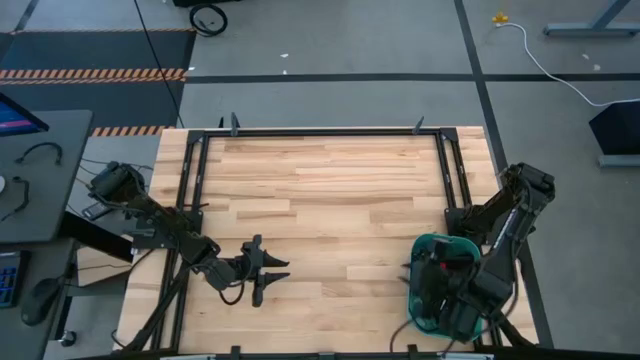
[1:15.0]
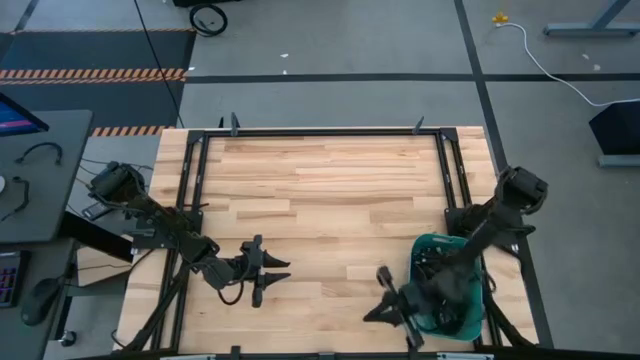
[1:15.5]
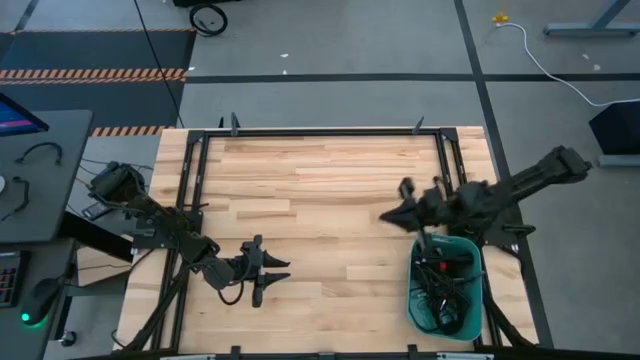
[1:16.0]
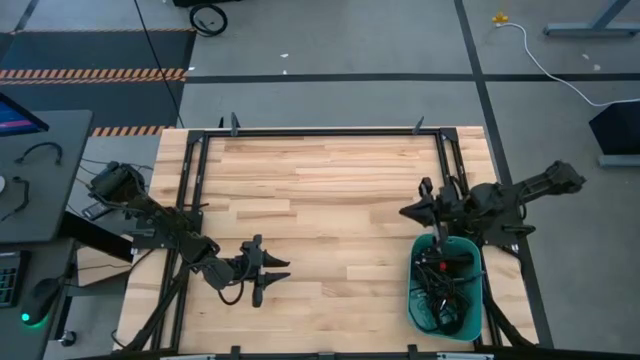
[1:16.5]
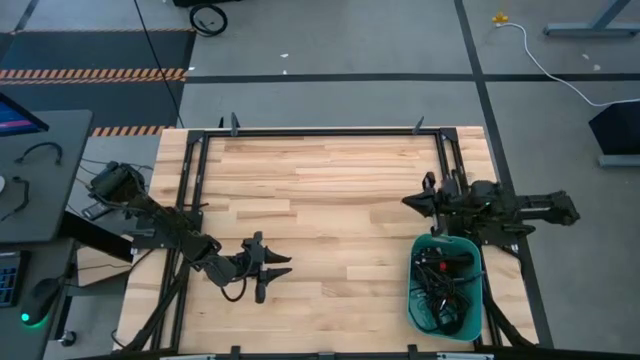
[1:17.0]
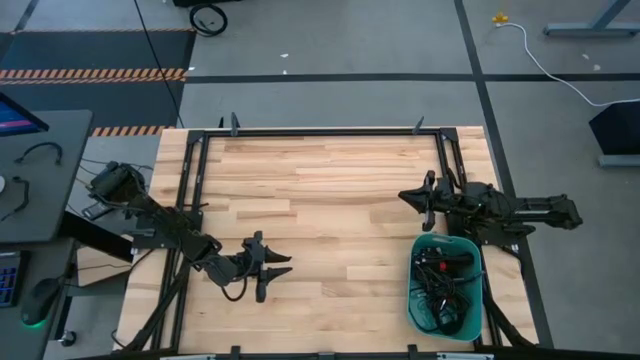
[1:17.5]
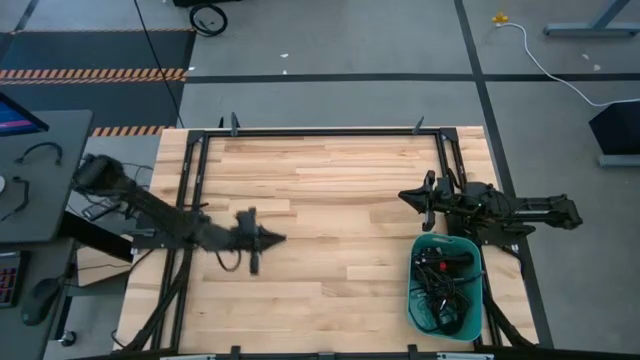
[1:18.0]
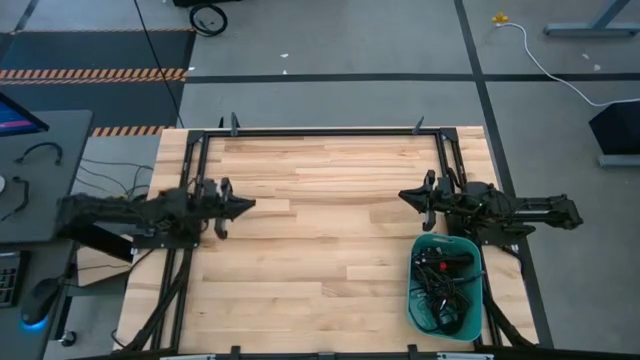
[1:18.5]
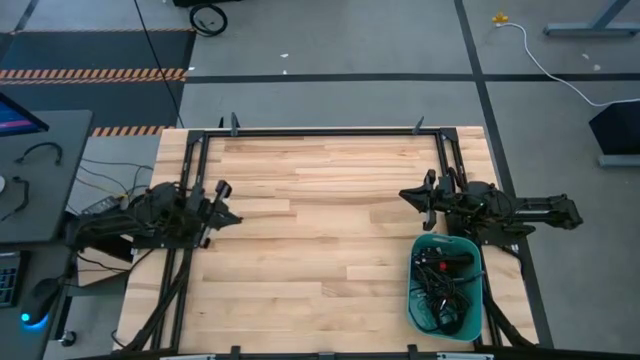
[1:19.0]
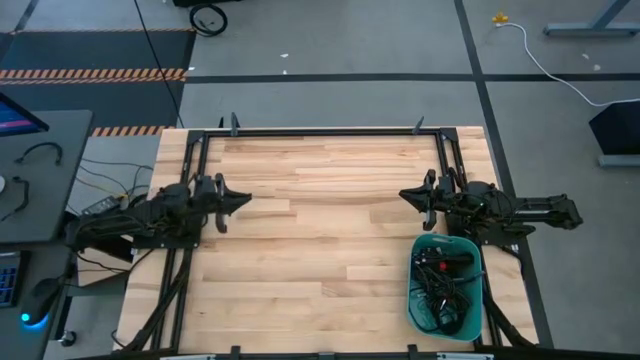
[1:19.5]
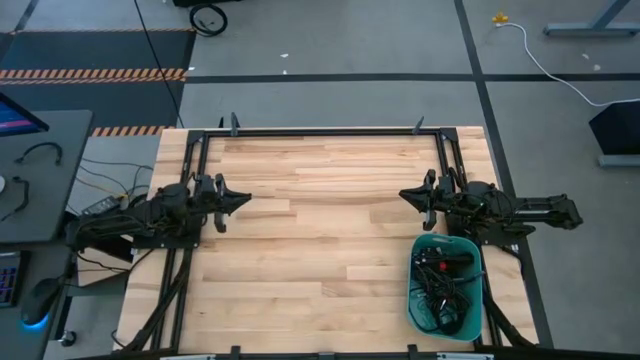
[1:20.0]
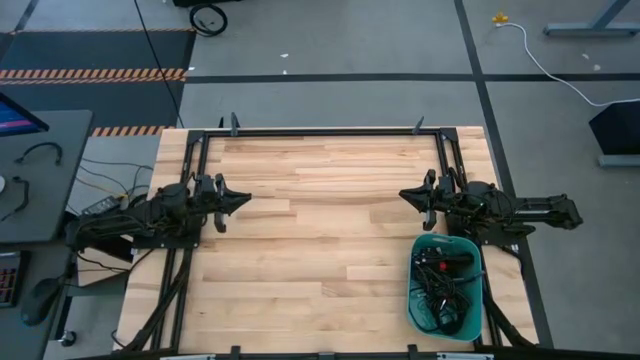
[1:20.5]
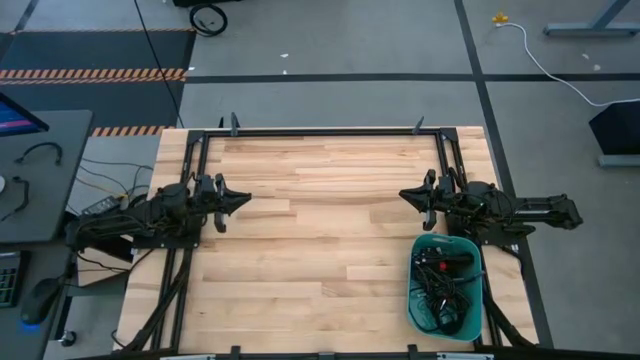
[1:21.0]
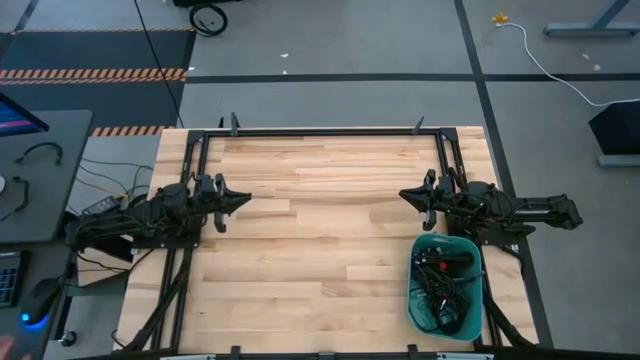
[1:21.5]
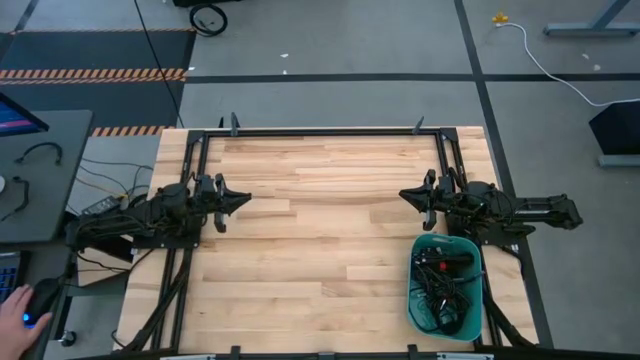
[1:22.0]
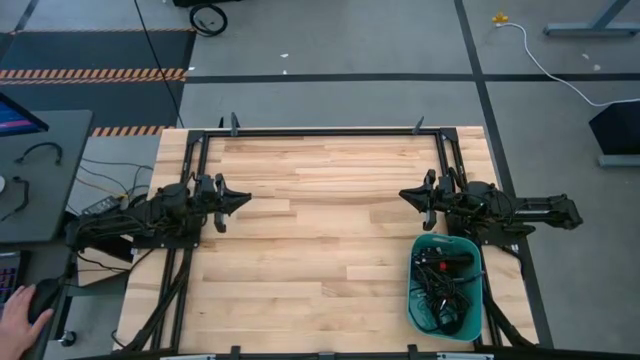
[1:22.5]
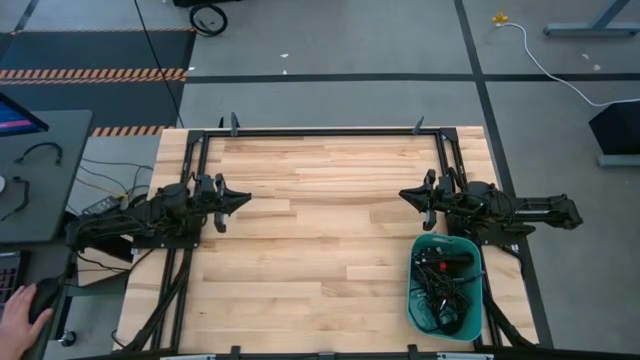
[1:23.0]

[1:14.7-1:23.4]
Task: Pick and place USB-C Cables
Return to Home Position

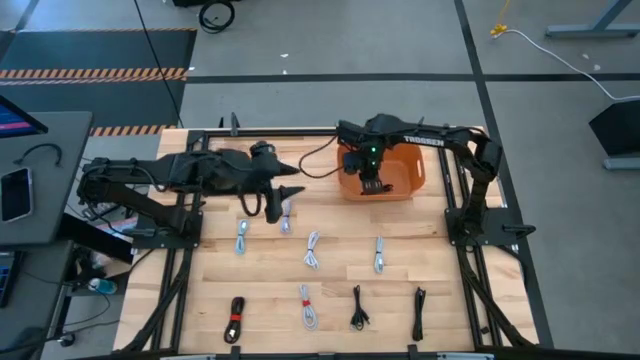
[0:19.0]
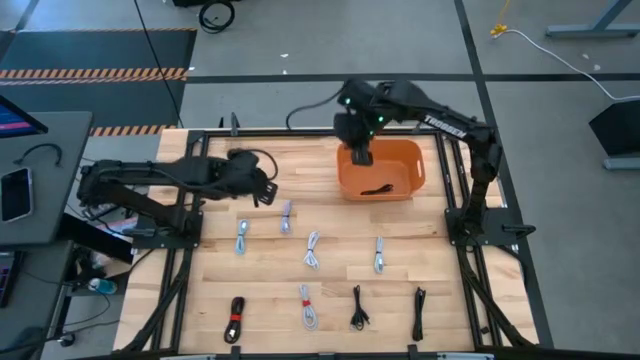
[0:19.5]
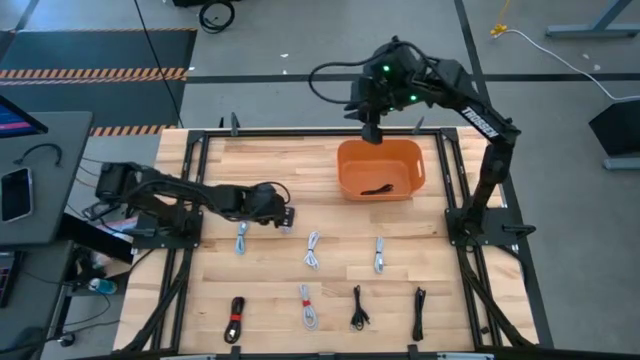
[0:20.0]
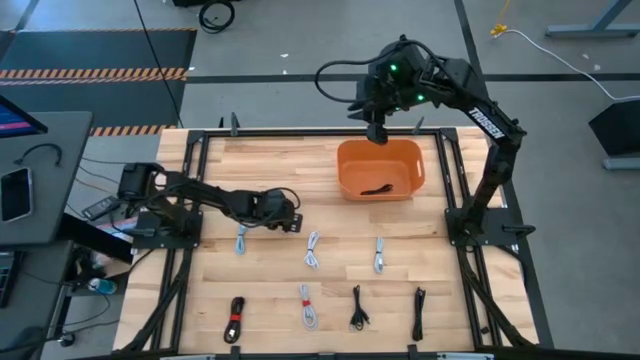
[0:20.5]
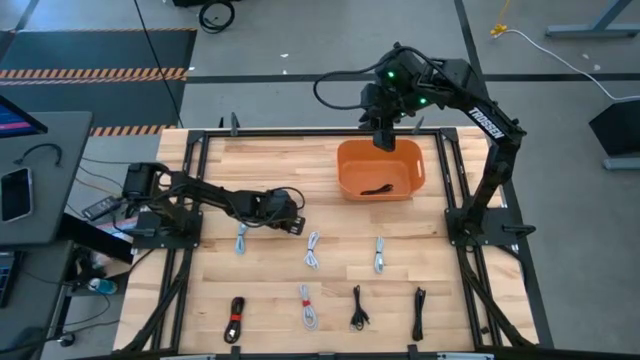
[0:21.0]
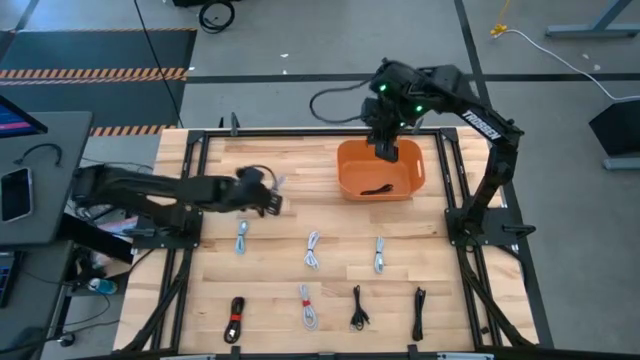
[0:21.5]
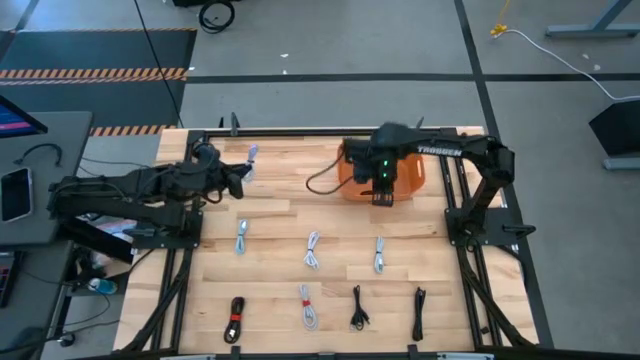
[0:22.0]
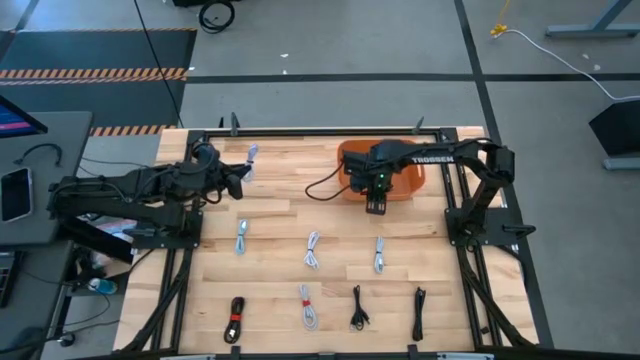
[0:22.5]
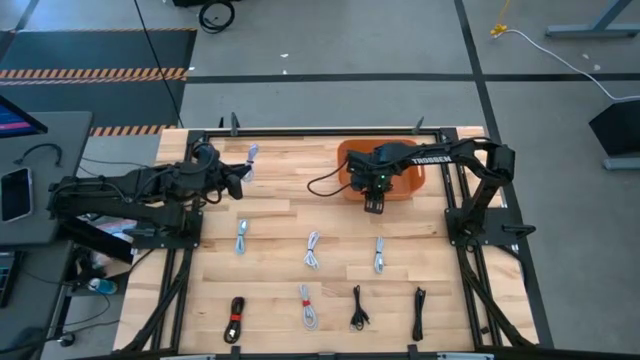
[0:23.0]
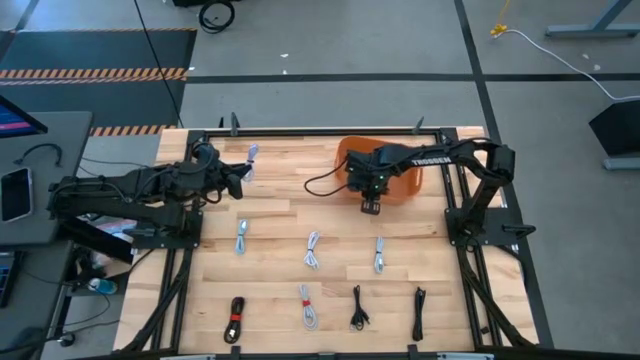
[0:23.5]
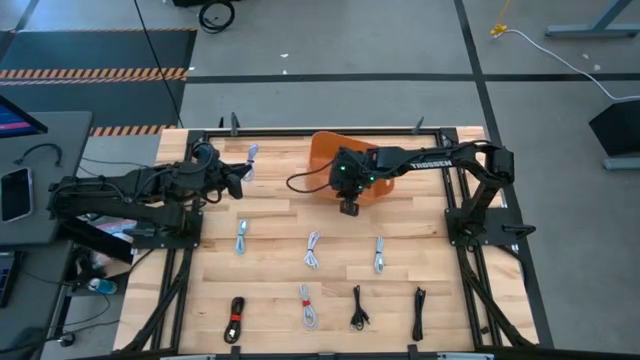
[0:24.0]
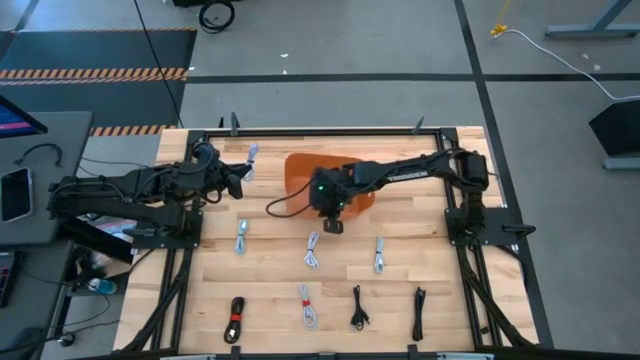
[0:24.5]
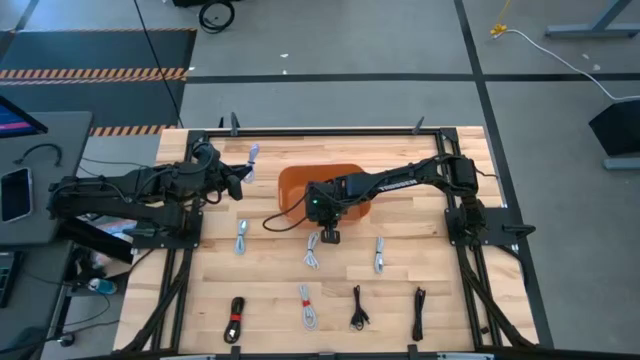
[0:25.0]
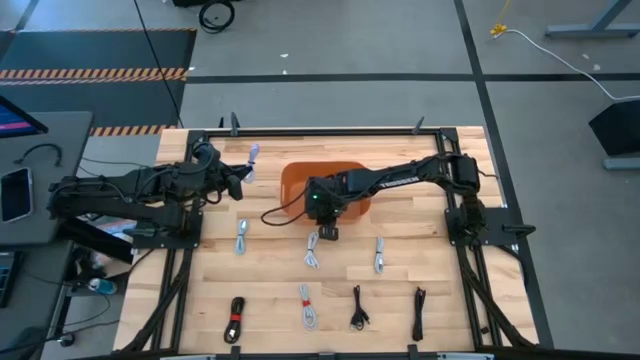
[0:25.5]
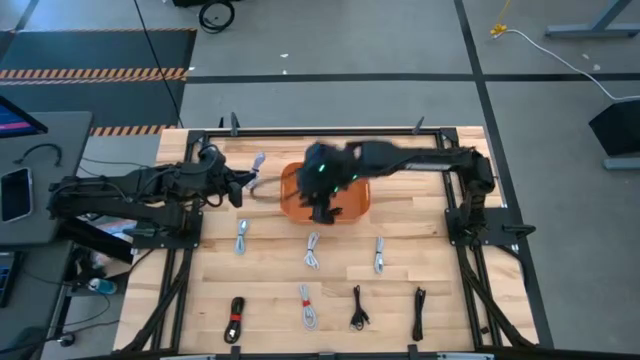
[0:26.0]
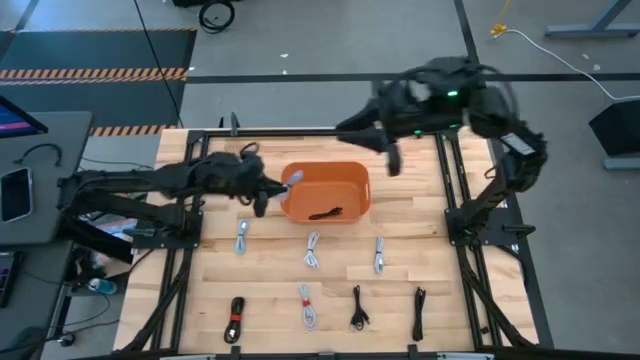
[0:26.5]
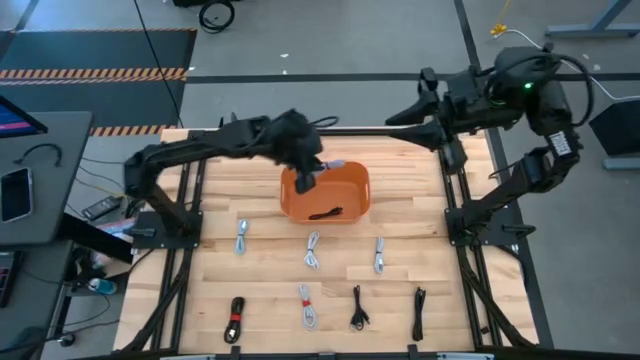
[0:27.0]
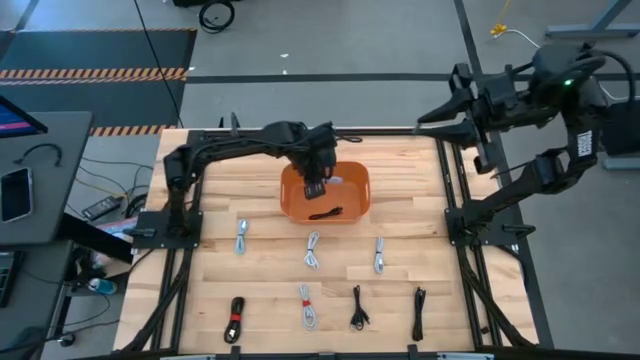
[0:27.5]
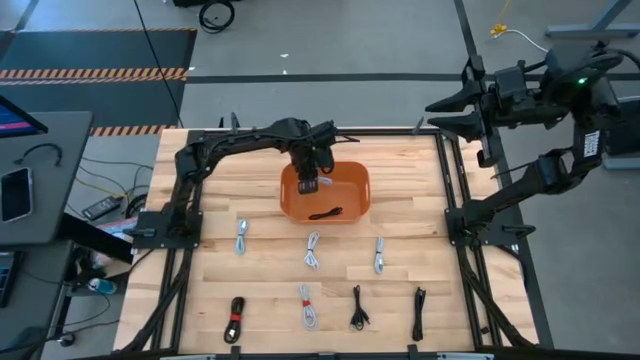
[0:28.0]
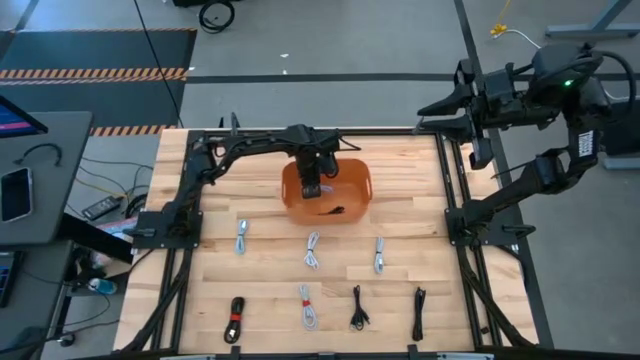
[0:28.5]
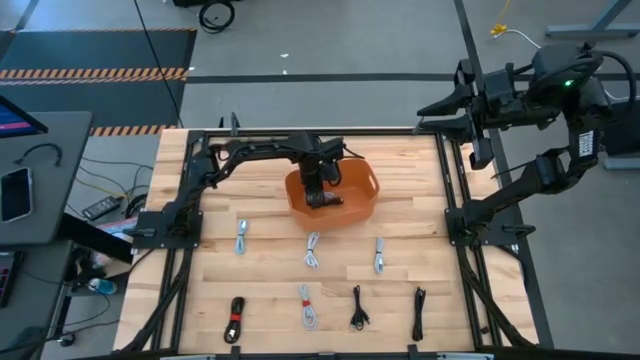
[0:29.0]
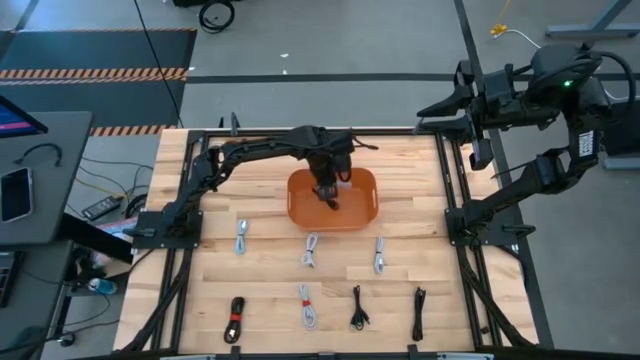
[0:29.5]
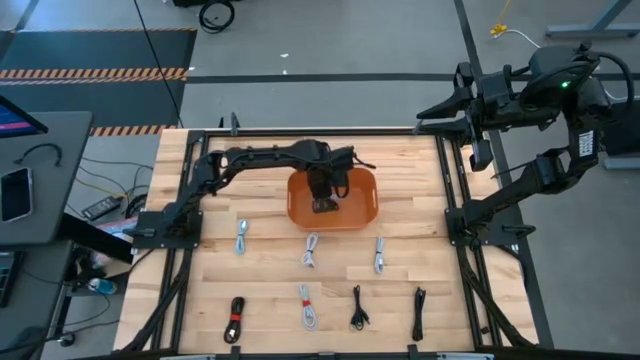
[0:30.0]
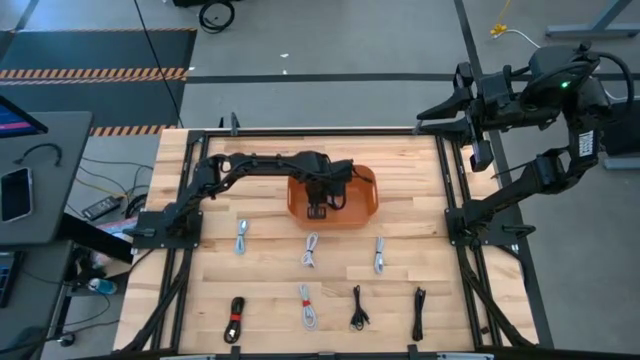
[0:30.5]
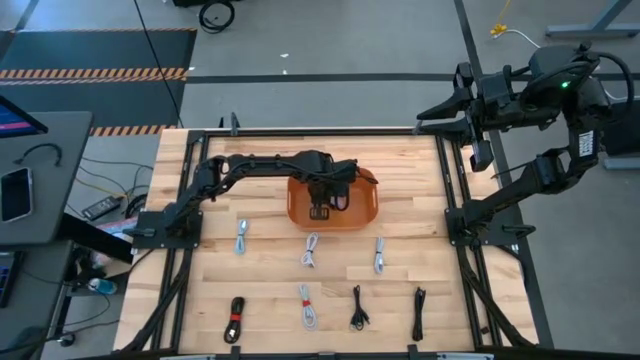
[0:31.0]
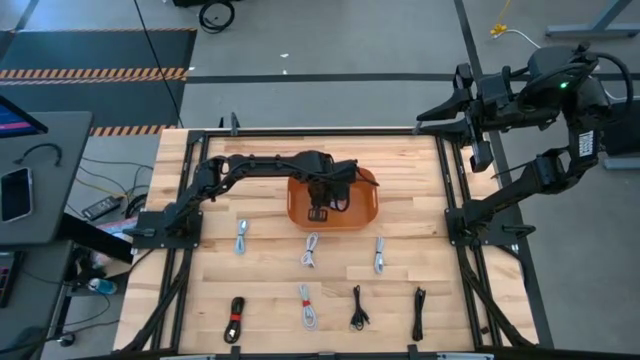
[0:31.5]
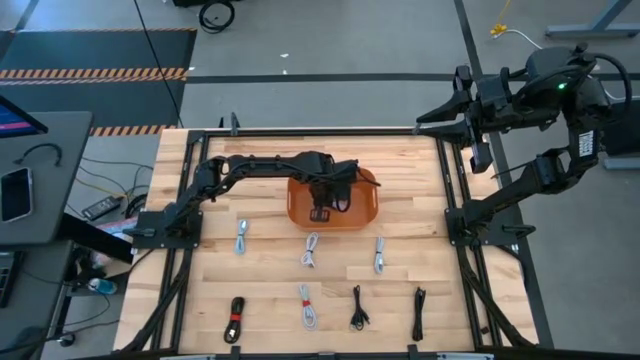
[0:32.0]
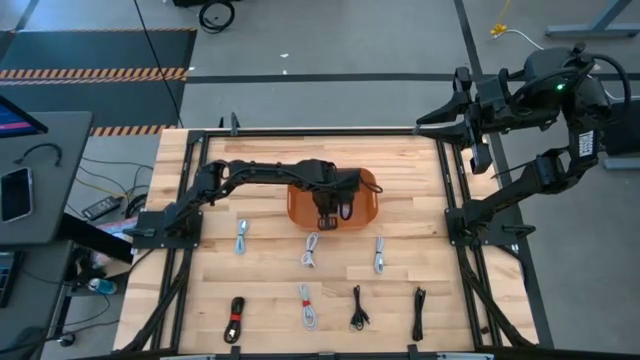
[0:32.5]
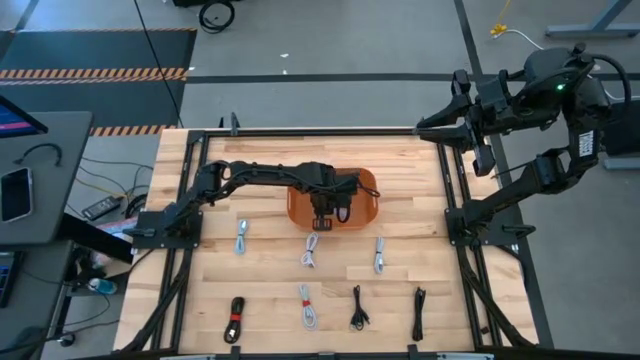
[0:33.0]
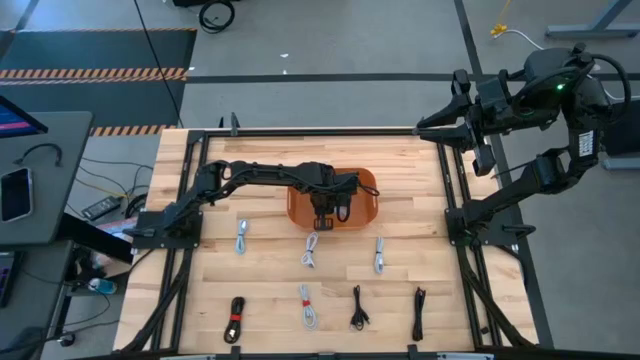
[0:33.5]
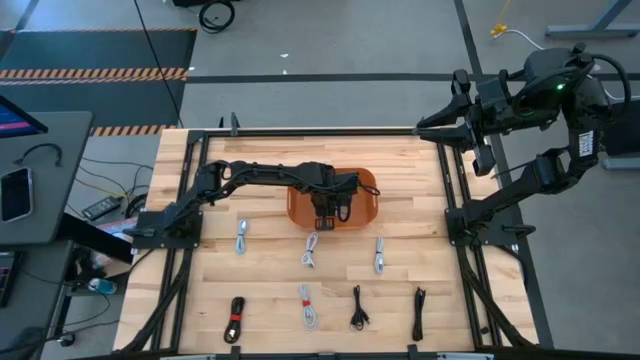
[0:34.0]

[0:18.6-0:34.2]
Task: Pick and place USB-C Cables
Put the blue USB cable into the orange bin
